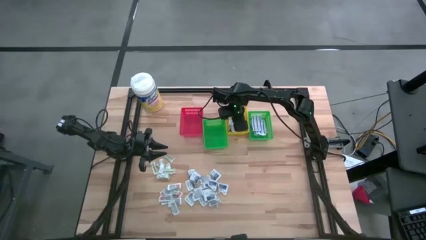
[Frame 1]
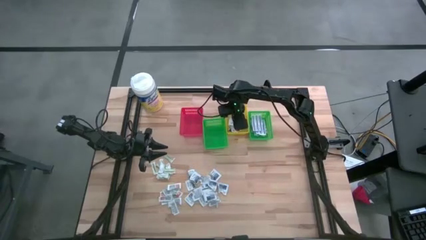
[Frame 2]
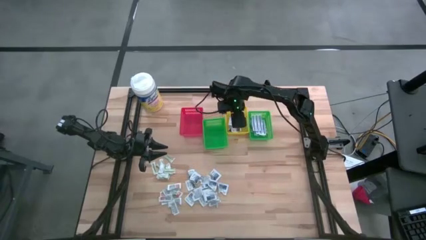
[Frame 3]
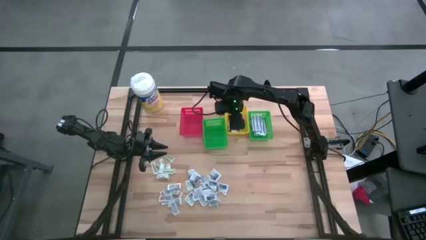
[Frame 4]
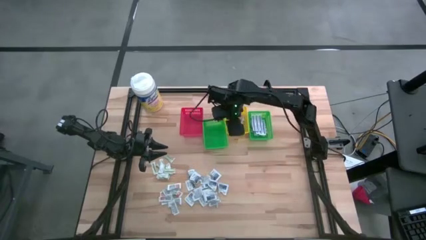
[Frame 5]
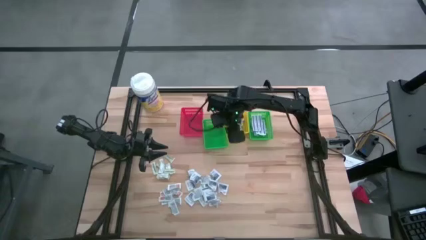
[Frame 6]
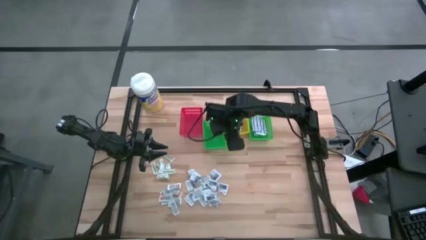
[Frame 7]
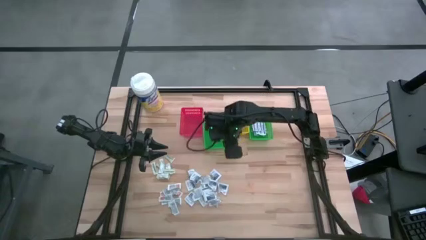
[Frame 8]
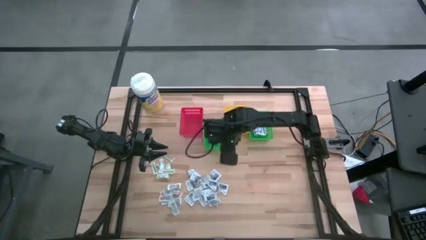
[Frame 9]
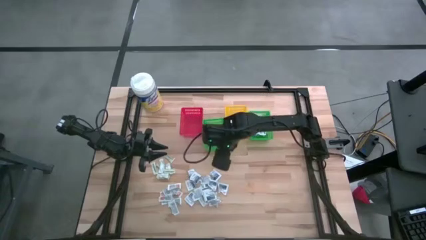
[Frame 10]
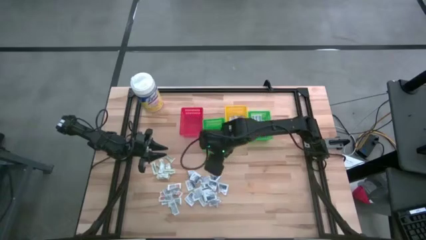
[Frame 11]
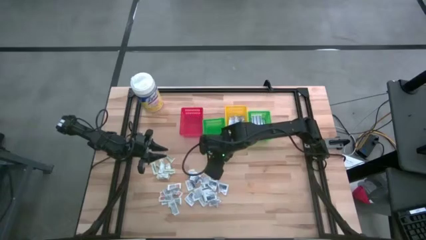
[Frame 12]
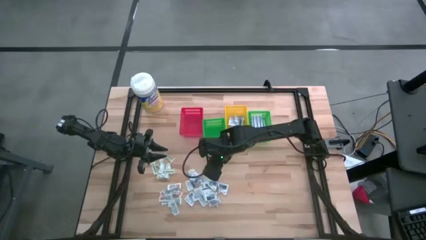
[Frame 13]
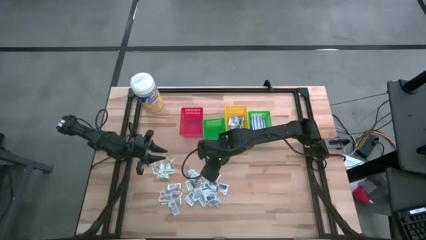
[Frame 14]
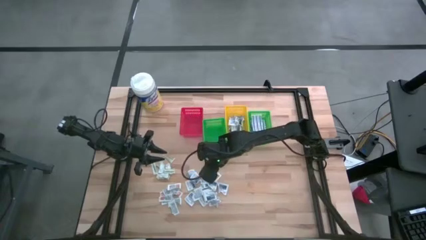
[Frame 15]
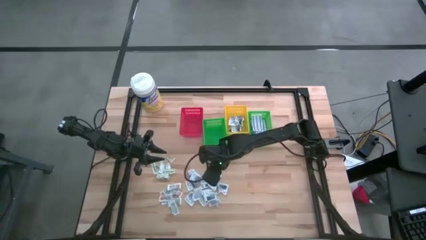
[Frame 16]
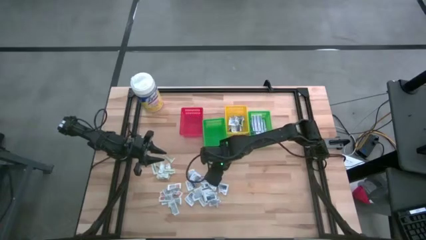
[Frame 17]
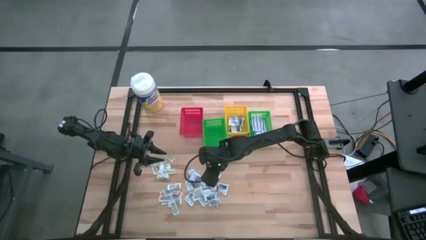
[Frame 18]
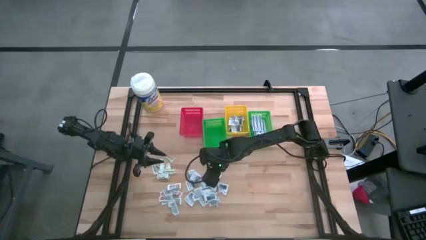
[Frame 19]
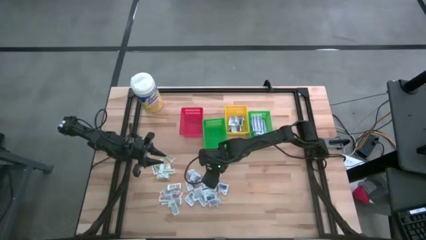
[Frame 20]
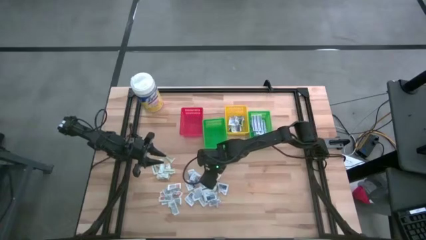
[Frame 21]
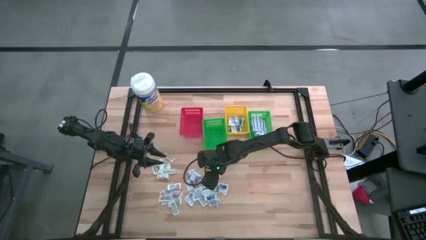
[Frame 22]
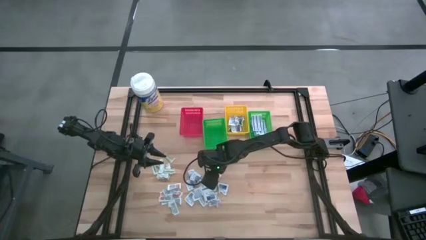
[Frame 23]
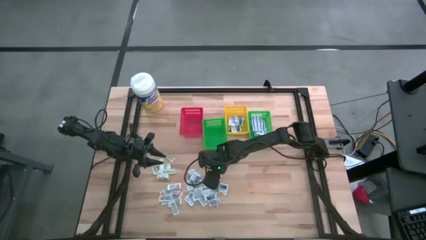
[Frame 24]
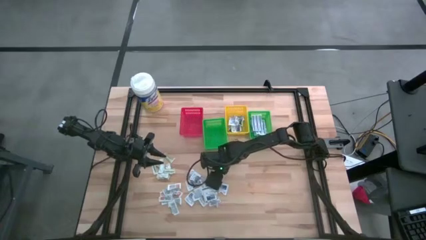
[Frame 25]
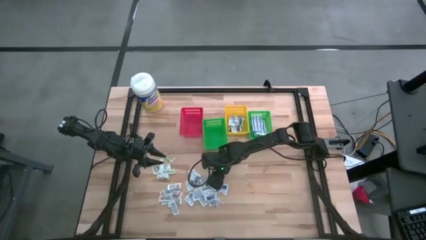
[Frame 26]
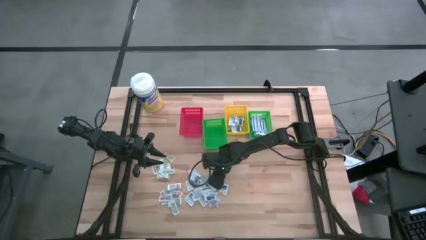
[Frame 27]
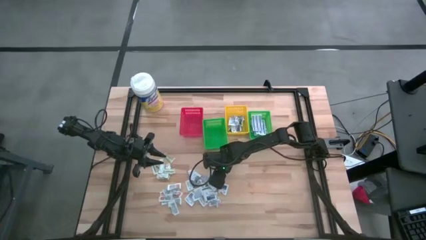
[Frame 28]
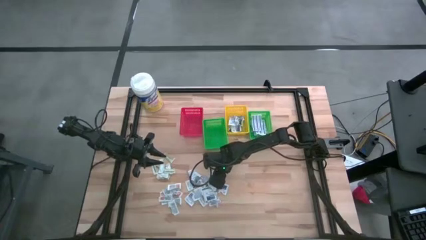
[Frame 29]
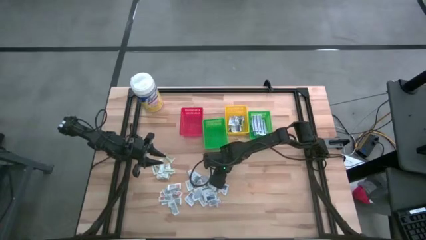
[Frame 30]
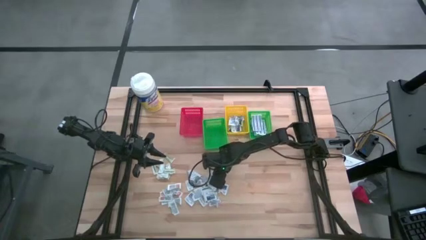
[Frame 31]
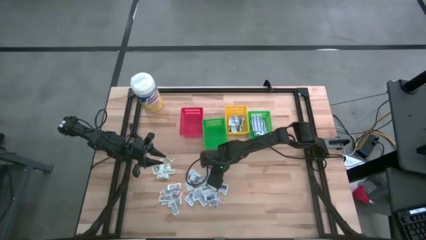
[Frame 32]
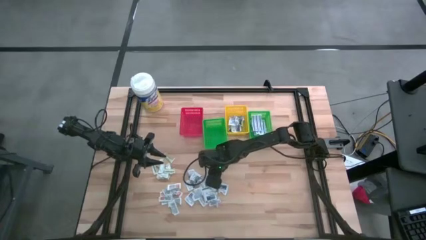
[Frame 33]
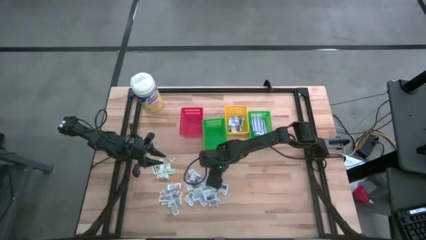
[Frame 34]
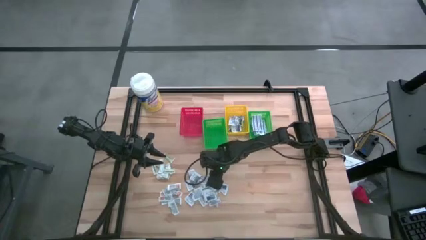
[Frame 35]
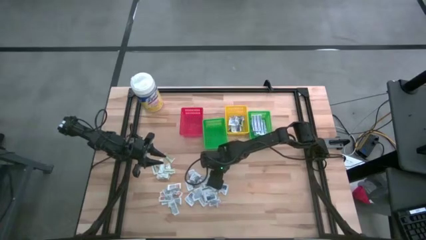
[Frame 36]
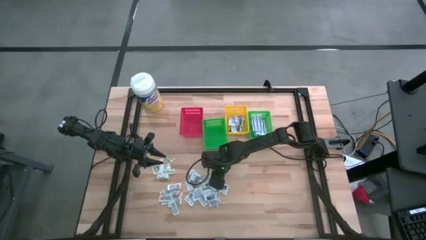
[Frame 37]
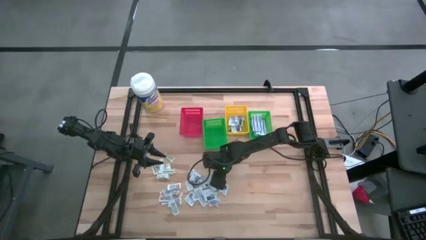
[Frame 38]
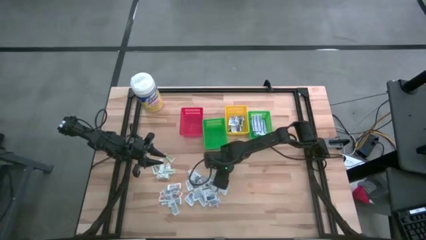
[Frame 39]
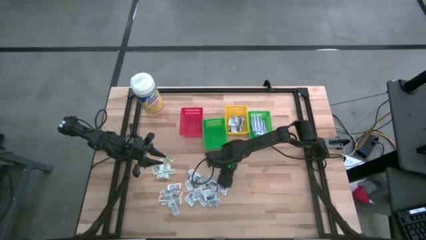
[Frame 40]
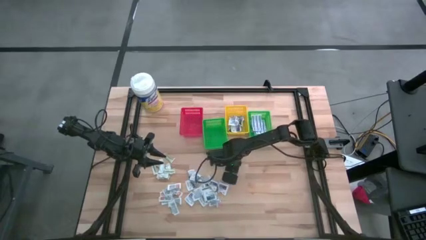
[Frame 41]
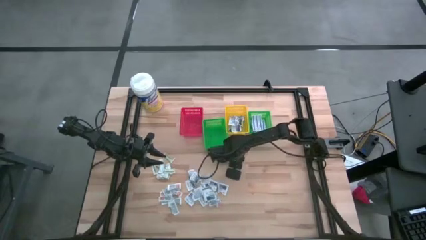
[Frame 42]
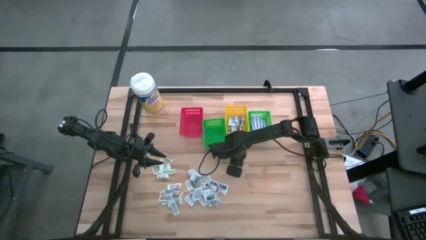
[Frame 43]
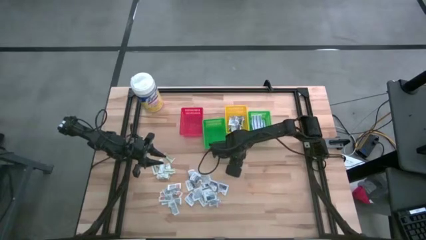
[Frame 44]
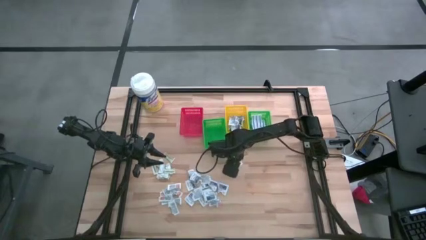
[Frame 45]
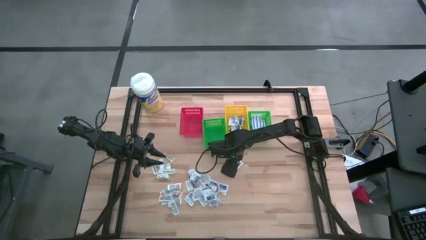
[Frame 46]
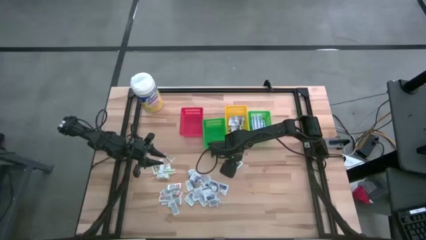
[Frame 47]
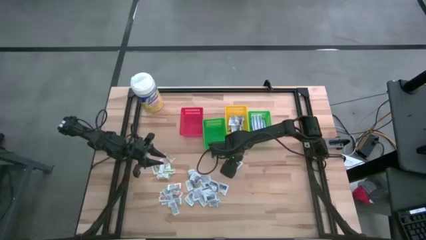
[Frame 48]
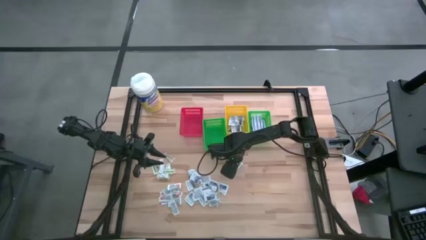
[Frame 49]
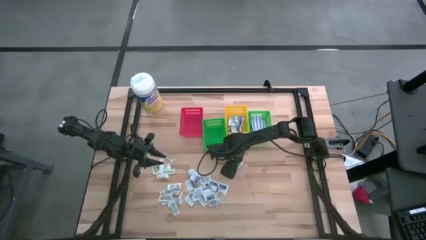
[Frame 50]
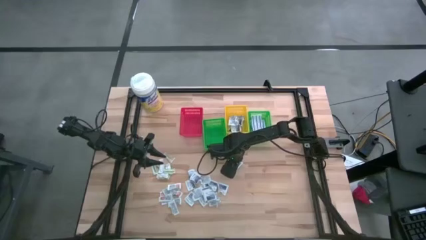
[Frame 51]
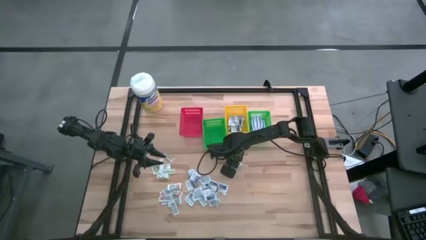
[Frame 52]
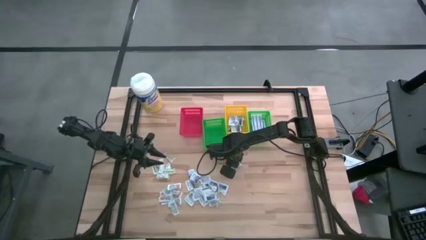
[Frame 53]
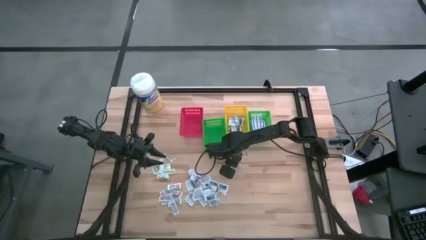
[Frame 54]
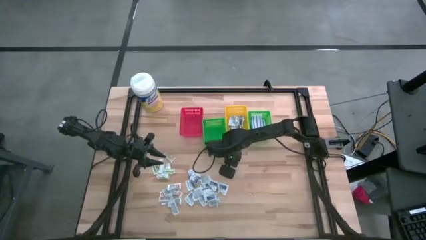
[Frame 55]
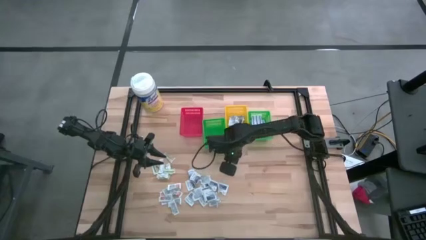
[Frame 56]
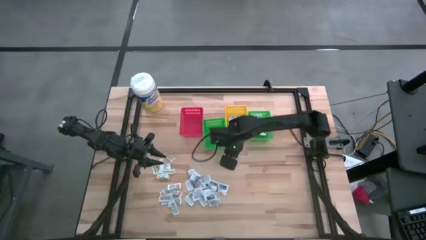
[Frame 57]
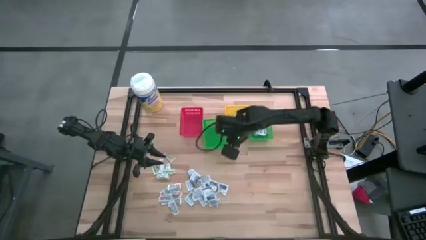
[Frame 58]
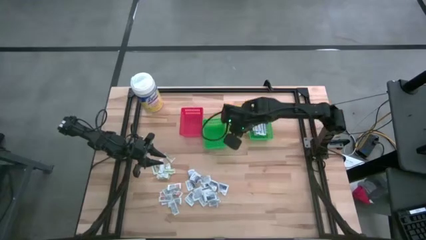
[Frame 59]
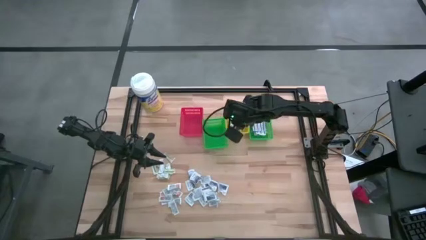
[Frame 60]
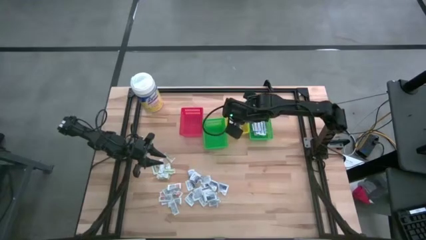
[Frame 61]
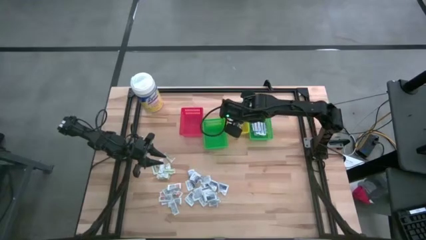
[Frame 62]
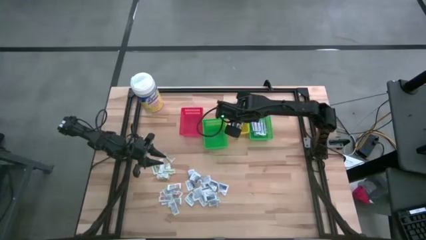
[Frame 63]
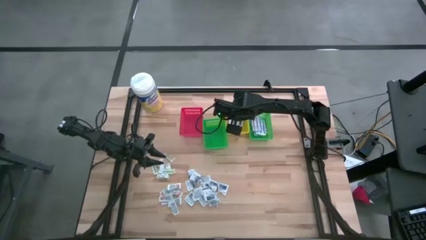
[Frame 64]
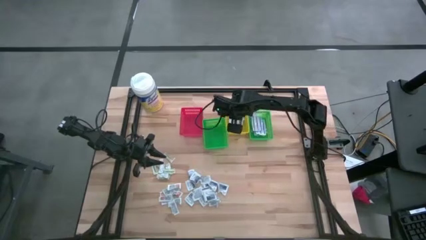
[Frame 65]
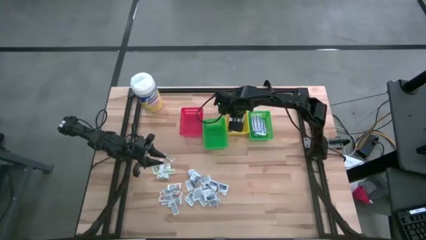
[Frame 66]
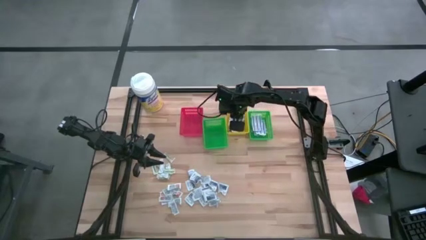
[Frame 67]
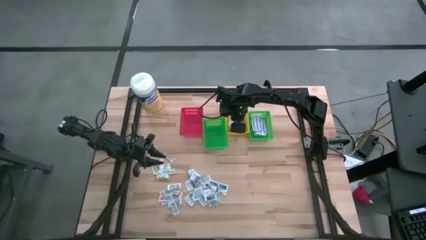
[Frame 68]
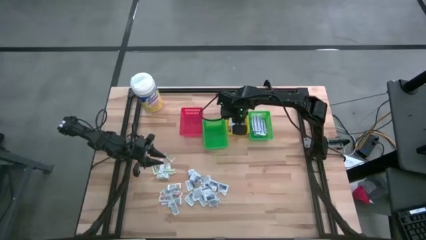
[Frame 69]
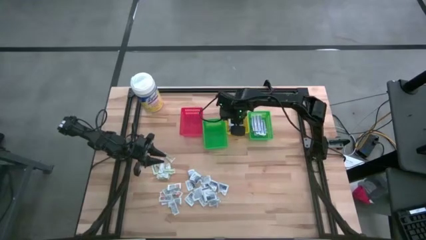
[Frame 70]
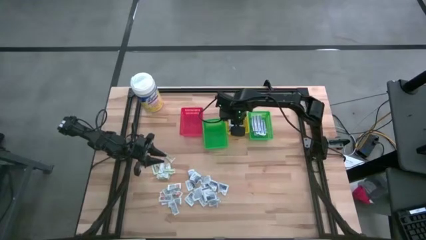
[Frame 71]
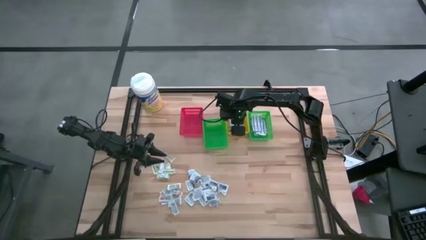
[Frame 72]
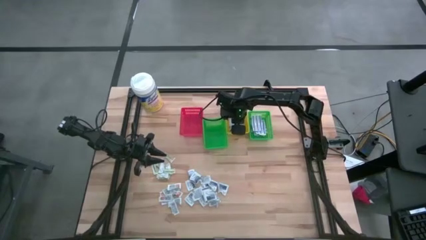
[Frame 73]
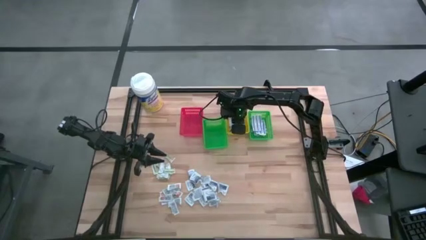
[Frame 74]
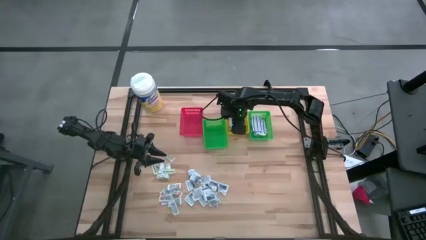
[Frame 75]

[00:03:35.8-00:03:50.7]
Task: Pick & Place First Aid Supplies
Put the alcohol pad into the yellow basket

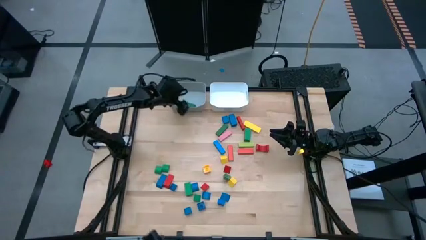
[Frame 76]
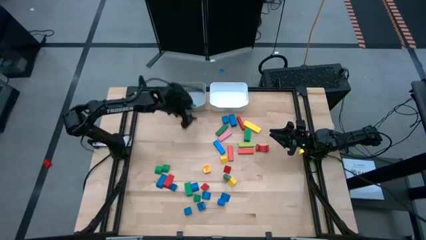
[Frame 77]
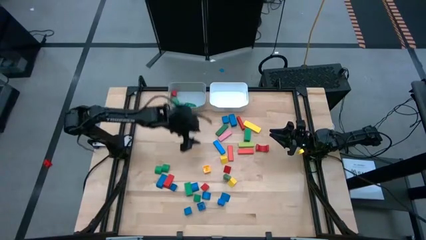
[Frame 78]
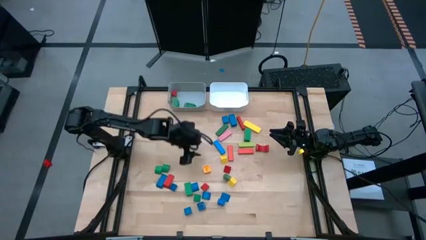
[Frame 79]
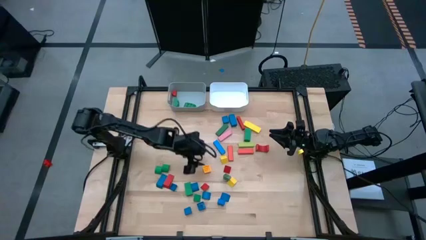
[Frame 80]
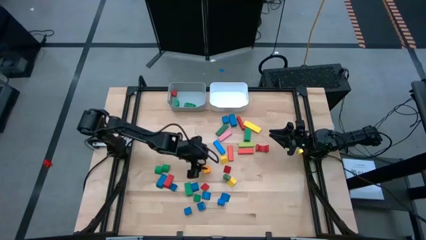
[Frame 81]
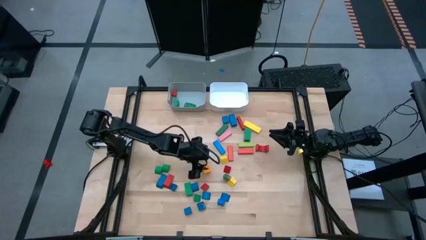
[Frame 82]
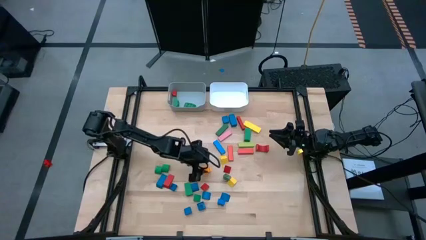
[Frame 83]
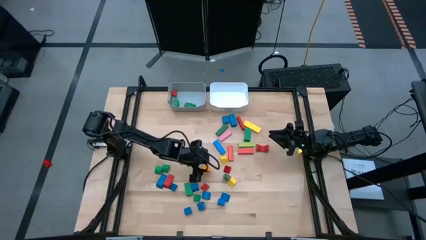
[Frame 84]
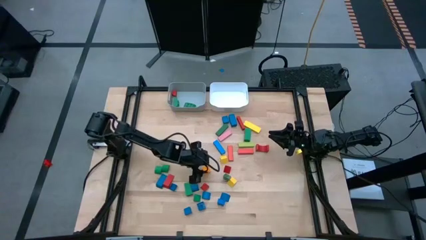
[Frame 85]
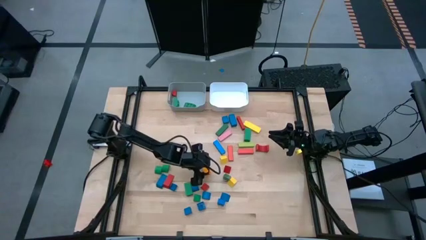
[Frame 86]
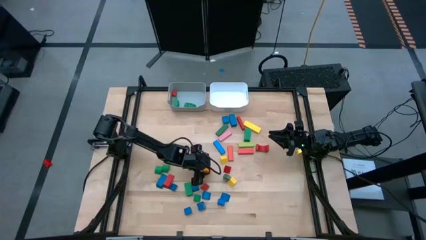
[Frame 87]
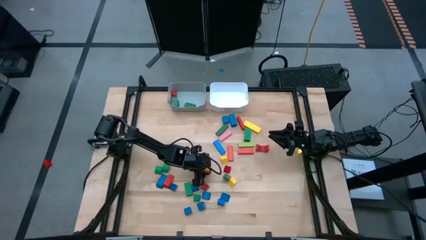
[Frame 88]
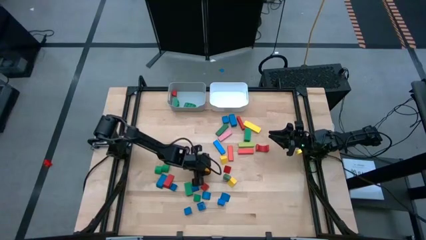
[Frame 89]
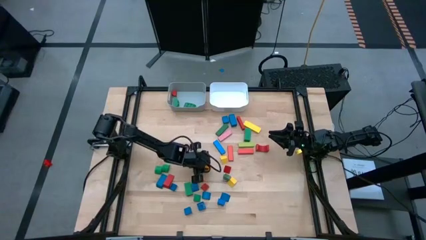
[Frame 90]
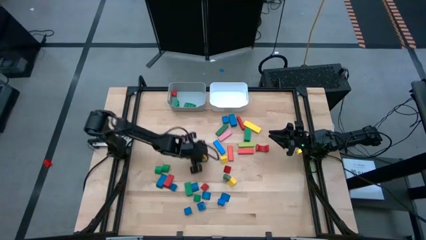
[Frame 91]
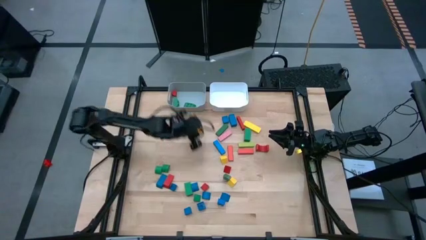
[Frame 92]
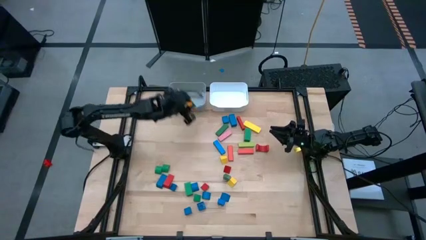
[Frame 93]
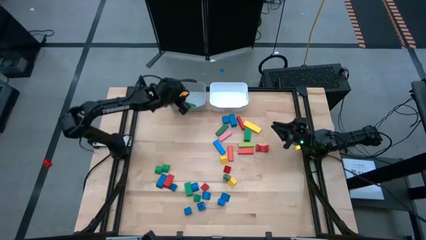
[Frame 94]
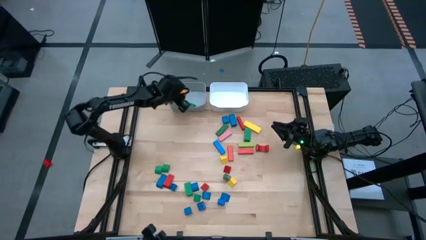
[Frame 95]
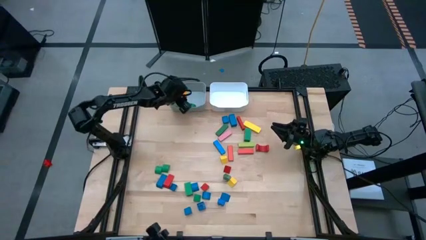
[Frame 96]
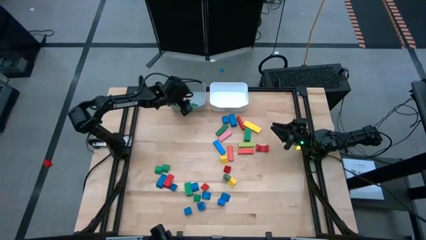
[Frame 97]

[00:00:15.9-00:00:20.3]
Task: Sort blocks by size
Put the yellow 4-stud square game piece into the gray bin
